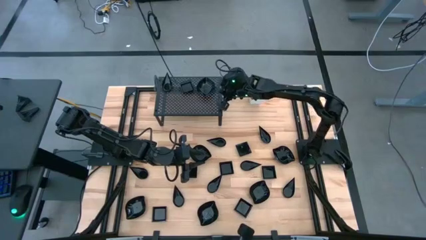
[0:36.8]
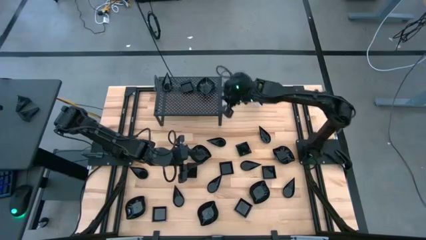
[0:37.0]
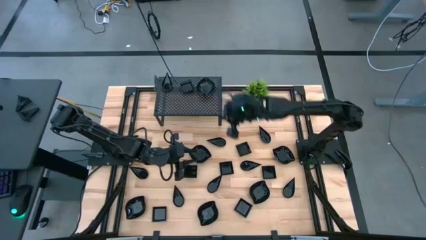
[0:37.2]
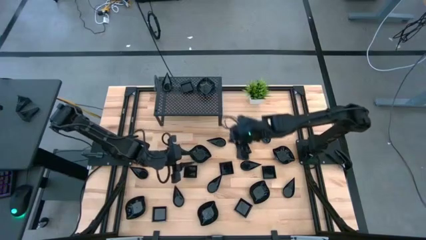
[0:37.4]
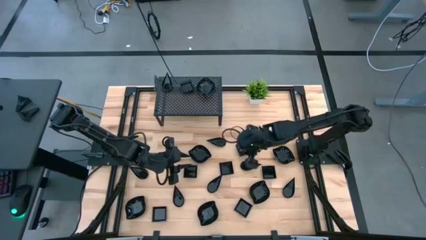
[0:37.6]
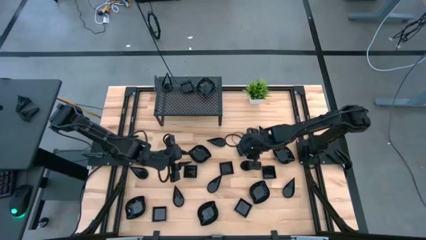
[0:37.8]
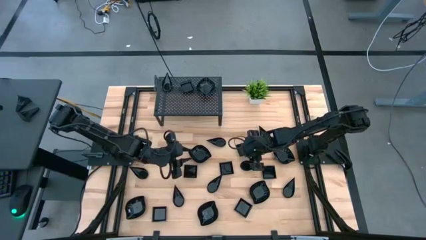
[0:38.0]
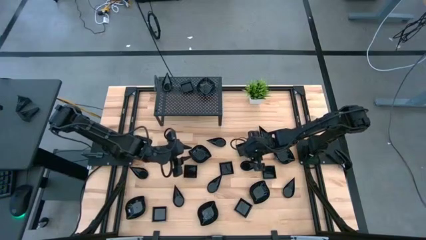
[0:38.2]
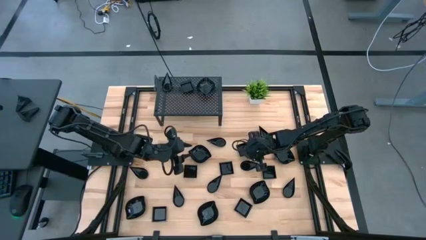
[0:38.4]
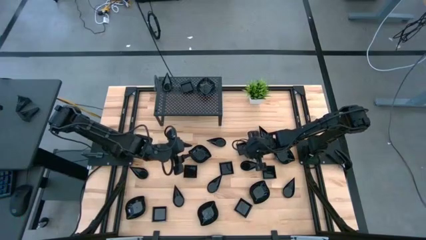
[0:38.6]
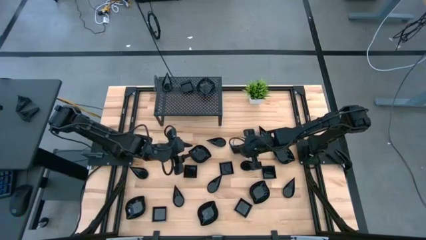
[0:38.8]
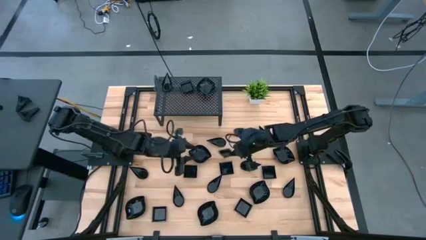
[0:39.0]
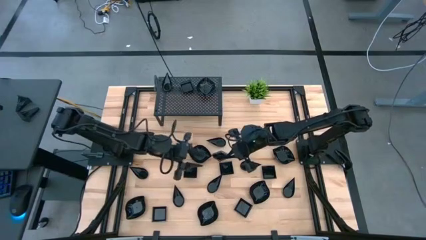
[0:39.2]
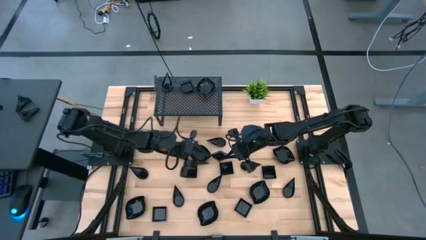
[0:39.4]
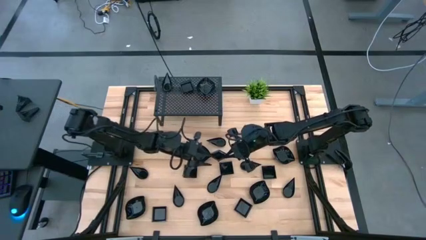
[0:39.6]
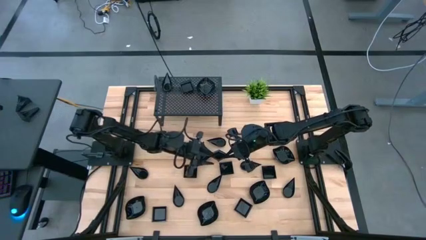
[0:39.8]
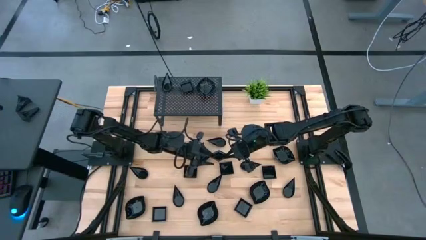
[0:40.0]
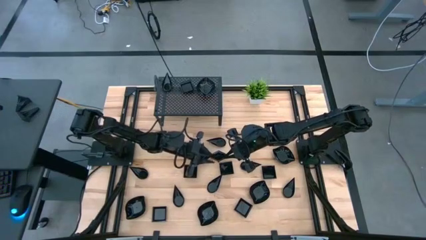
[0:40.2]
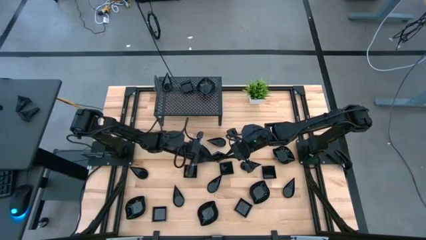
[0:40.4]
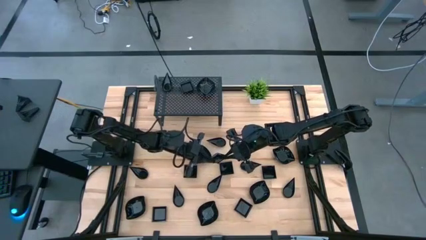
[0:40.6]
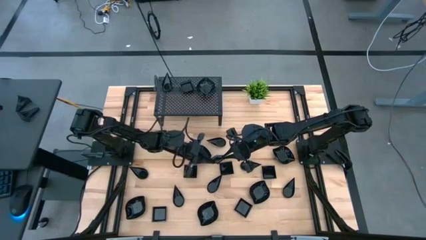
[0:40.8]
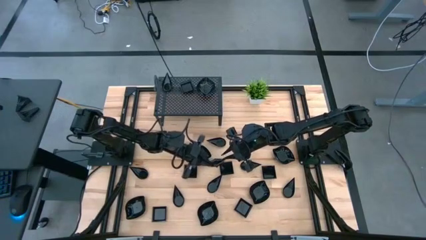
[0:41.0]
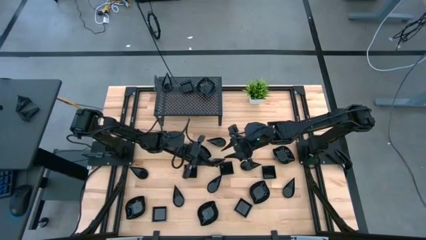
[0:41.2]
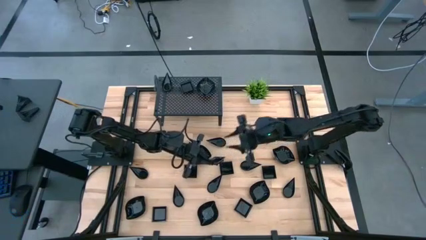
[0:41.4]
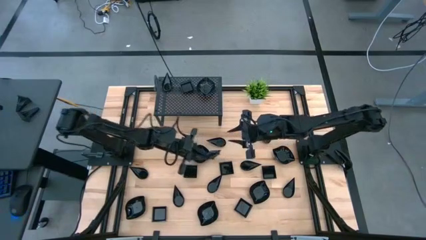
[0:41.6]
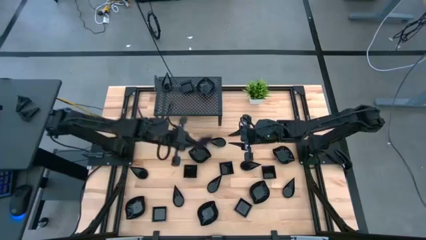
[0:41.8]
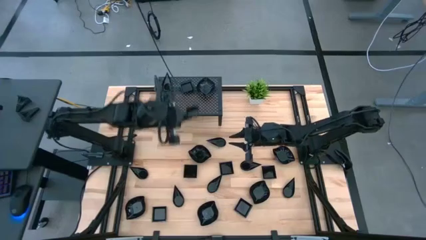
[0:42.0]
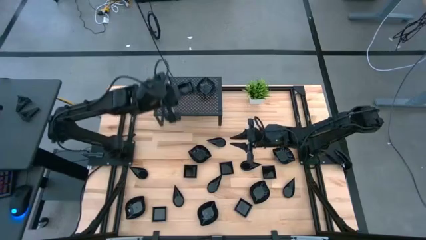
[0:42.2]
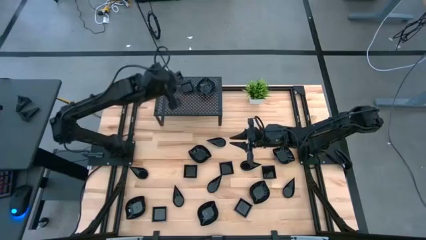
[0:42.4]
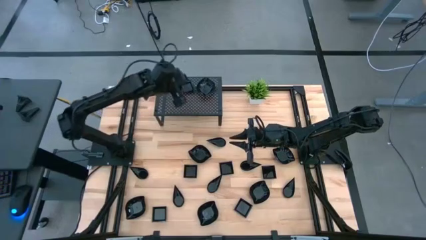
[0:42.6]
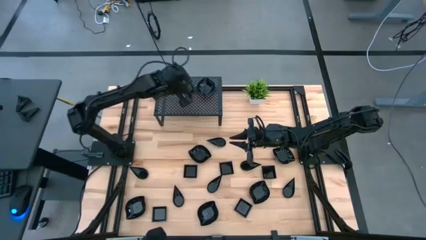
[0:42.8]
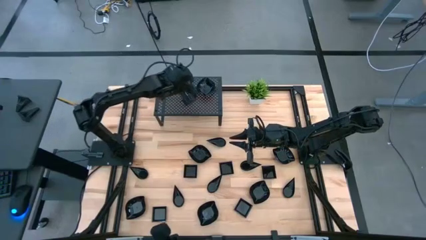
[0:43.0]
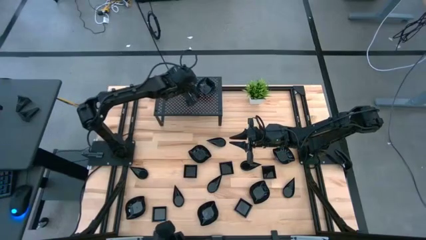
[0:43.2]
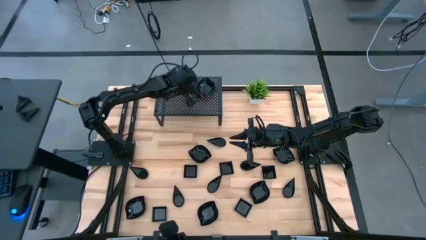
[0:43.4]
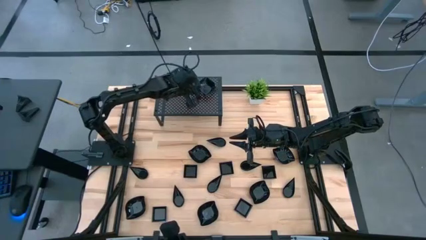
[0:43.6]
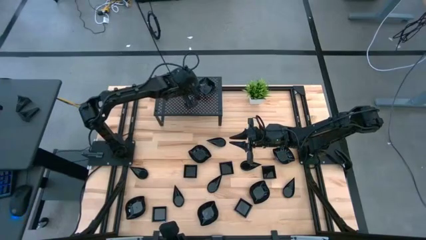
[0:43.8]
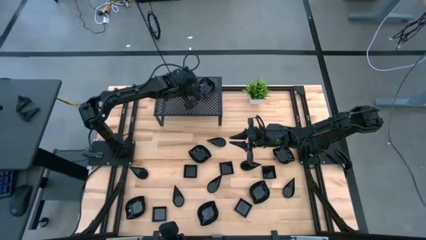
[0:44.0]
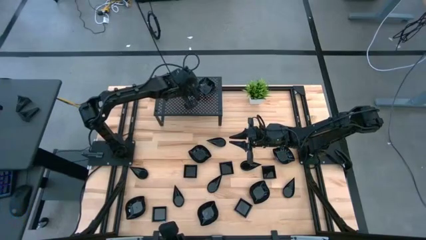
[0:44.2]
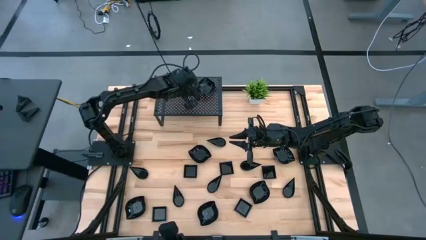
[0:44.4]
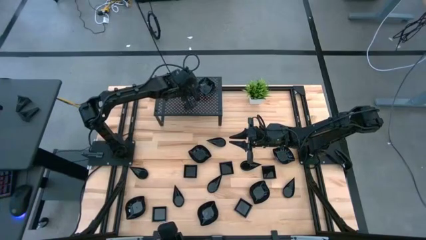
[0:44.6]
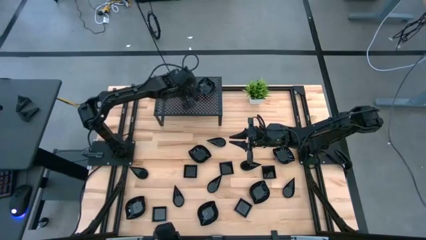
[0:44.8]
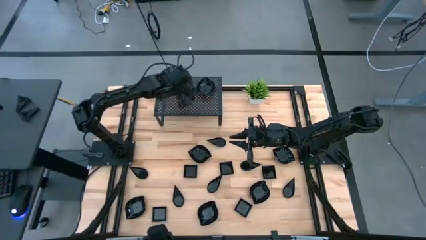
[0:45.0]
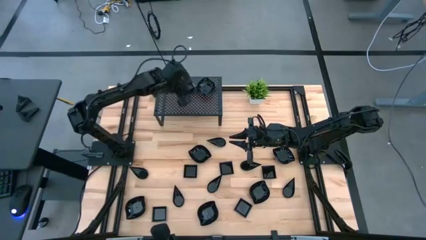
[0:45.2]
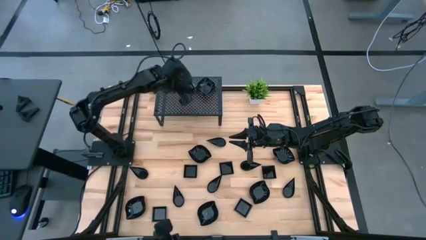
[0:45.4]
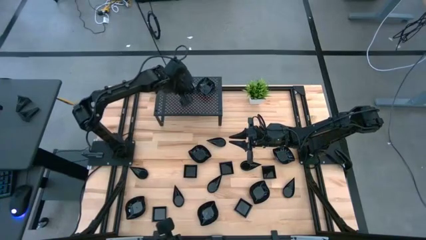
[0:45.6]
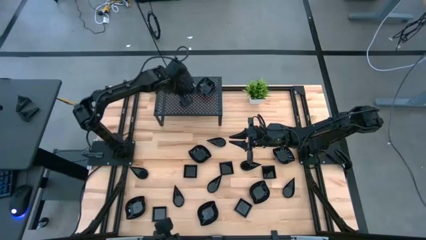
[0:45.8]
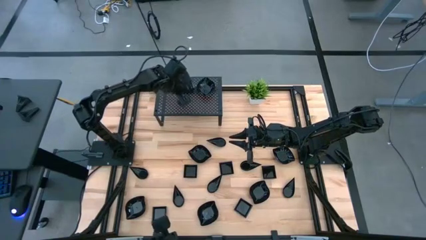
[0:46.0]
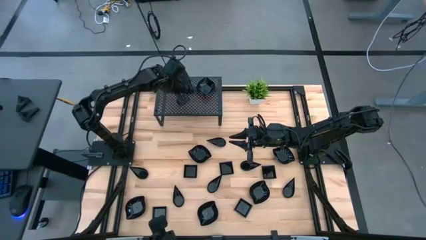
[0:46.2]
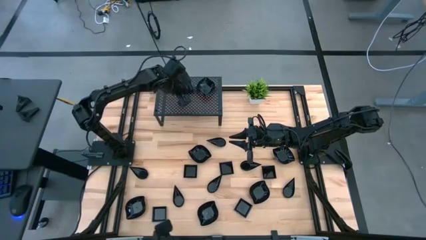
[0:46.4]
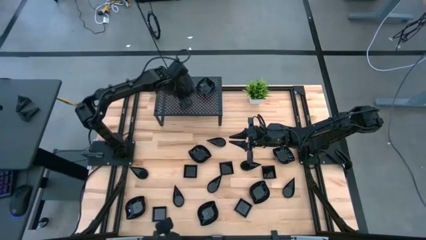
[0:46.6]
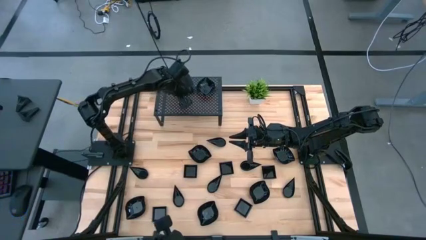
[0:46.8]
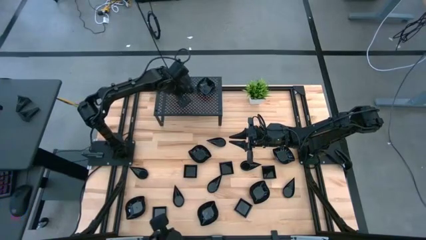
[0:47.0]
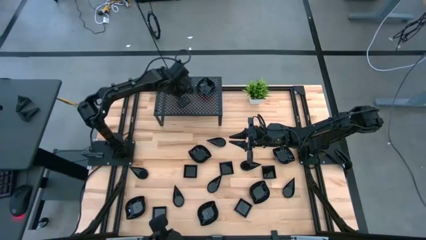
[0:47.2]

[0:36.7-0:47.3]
Task: Pick & Place Mini shaped plates
Stack the black square plate on top of the square plate on the shelf

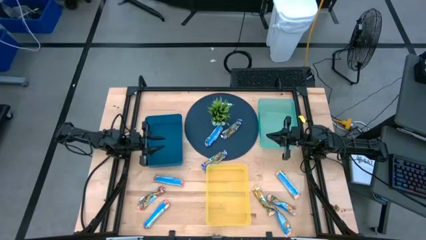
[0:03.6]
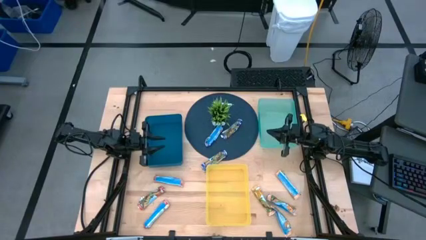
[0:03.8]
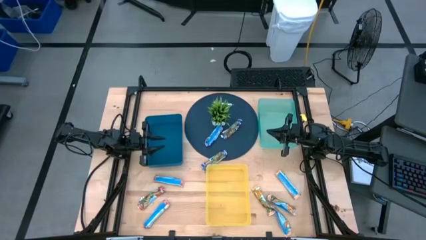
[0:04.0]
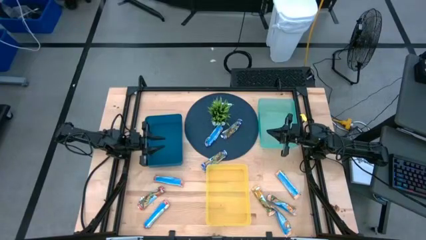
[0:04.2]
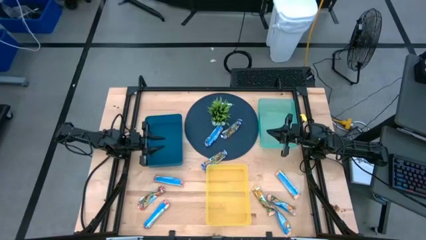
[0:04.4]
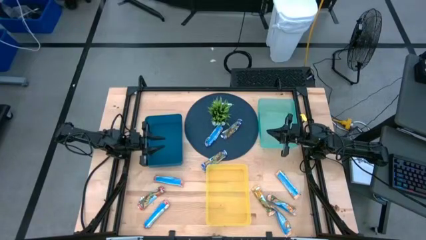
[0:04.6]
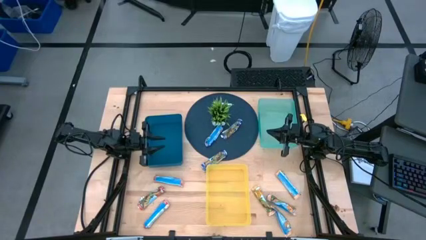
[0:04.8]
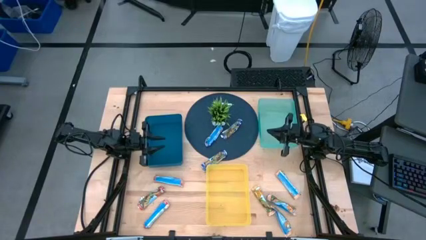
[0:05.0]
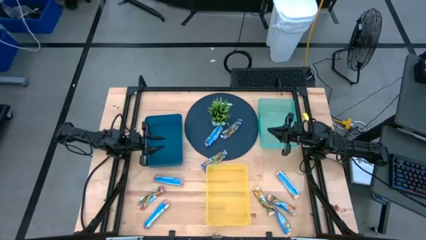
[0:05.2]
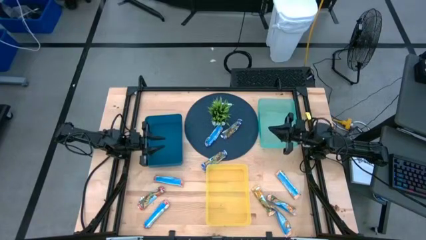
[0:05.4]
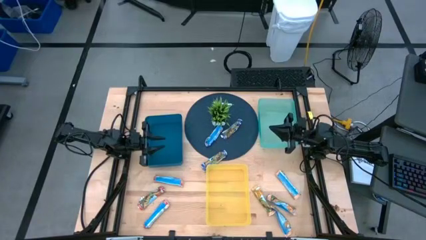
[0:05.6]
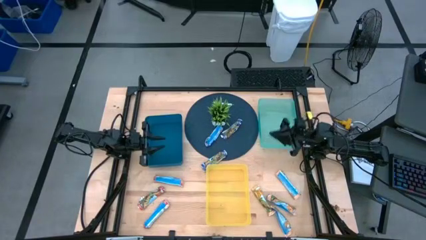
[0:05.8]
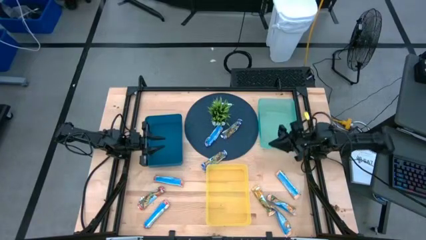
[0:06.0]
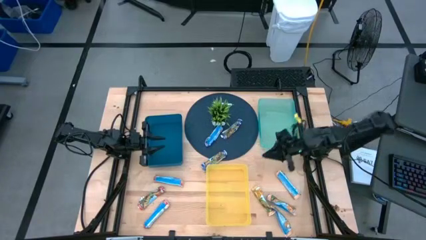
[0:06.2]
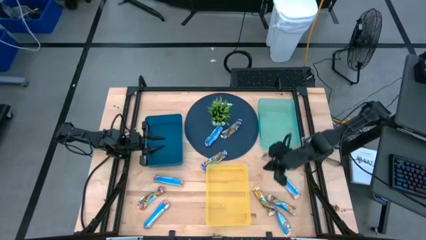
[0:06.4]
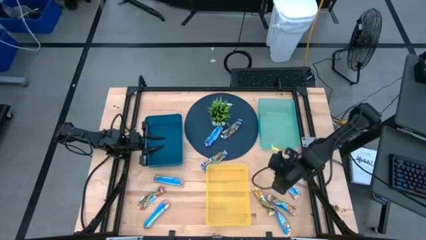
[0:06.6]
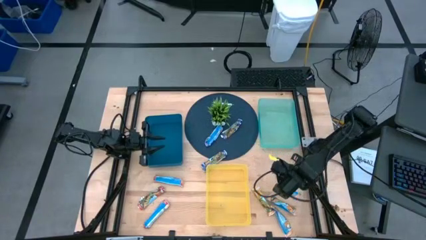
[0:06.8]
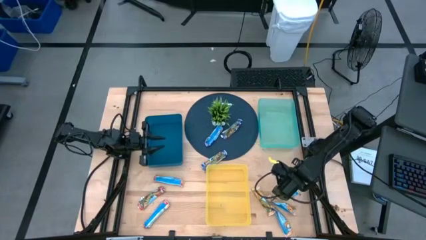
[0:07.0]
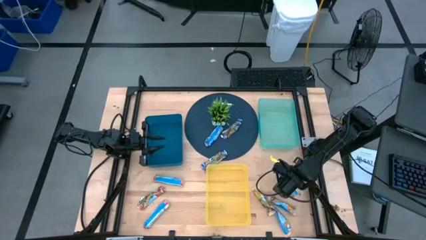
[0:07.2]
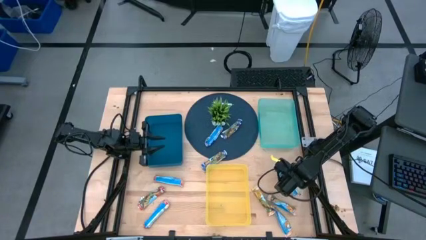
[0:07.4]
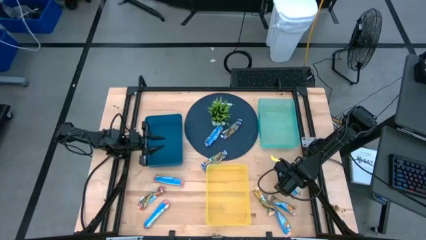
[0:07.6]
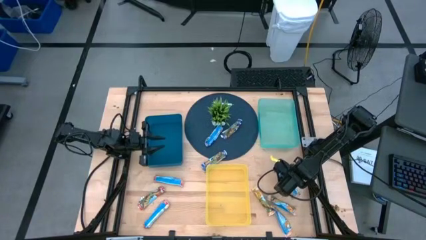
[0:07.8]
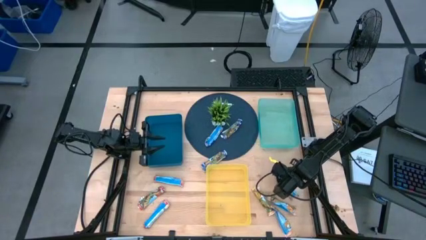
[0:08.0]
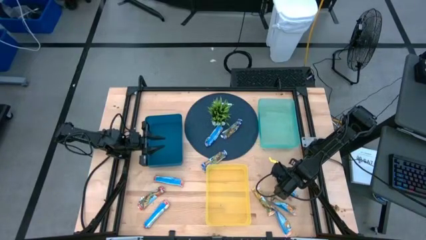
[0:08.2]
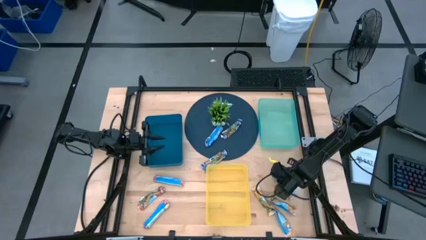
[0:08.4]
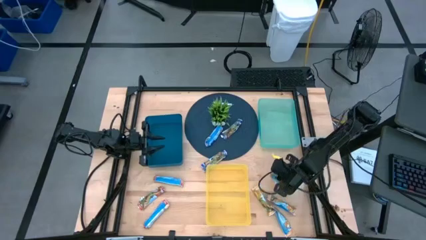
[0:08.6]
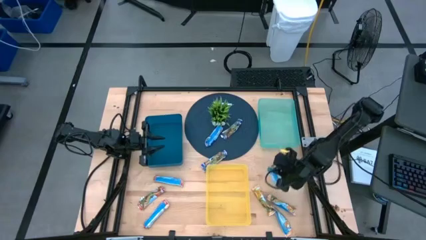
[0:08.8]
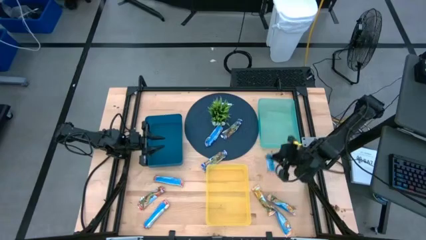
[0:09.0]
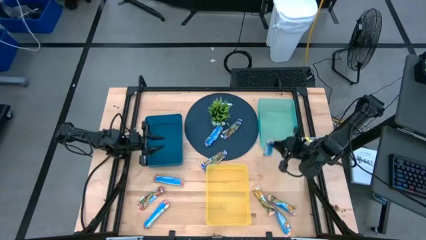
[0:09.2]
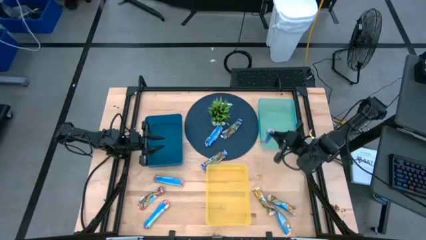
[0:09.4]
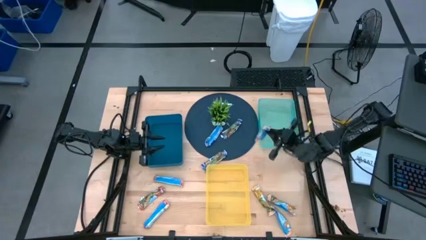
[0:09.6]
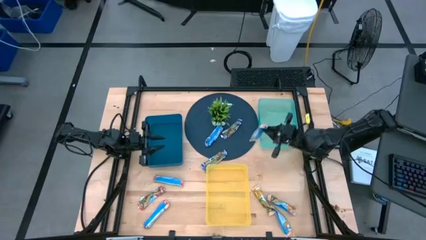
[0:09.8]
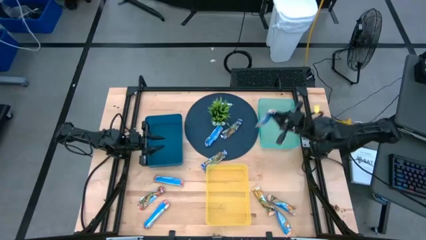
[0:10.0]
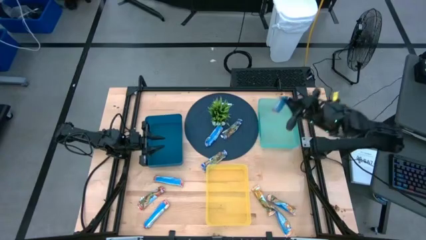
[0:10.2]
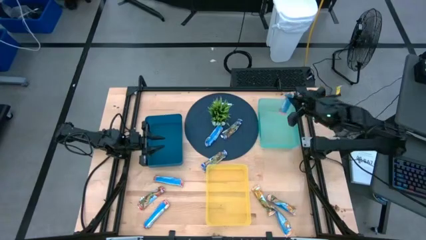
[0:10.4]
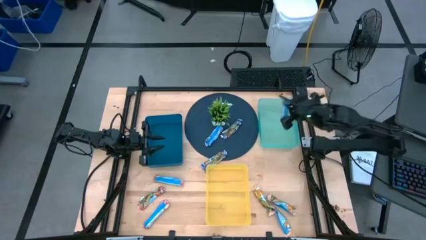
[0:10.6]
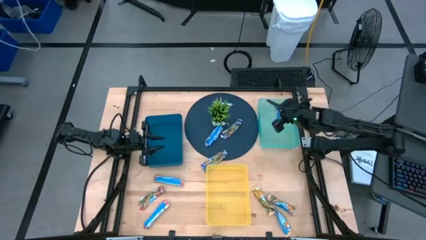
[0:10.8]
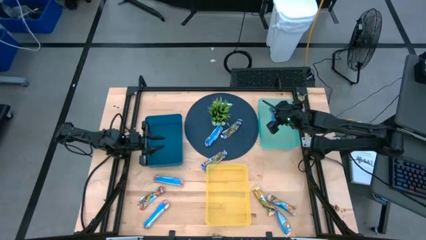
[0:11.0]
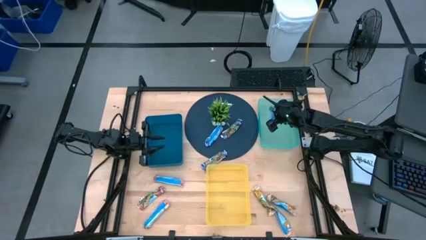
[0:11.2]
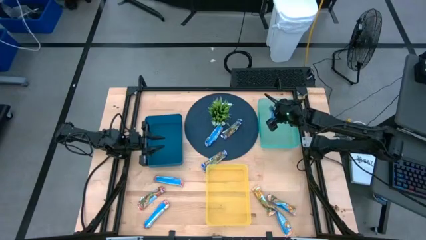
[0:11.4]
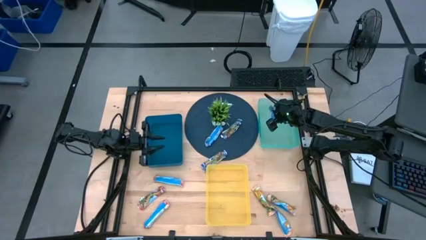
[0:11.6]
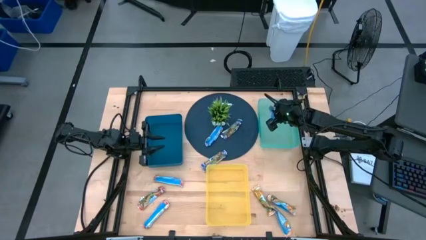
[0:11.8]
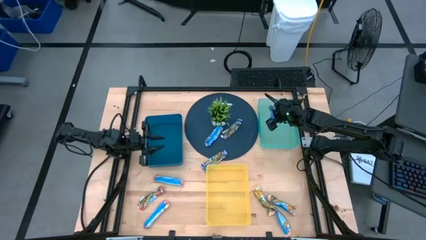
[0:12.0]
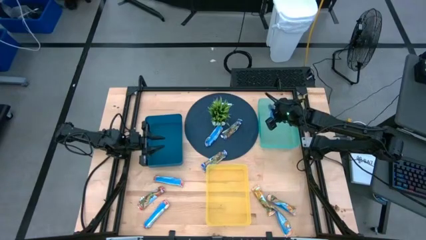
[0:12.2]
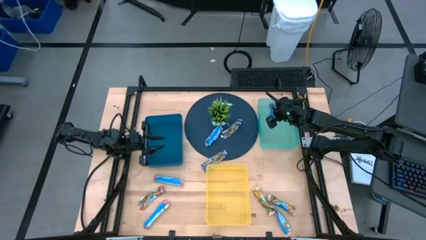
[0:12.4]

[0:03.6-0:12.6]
Task: Pick and place Granola Bars by type
Put the yellow granola bar into the green bin
